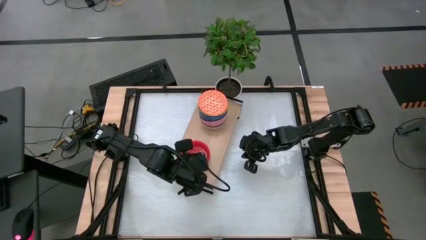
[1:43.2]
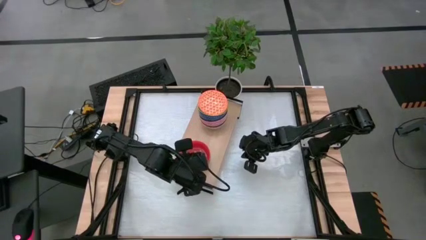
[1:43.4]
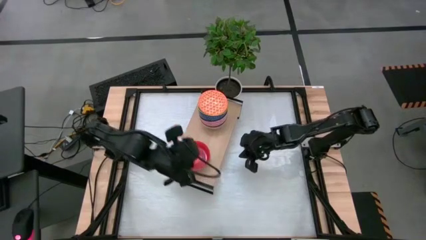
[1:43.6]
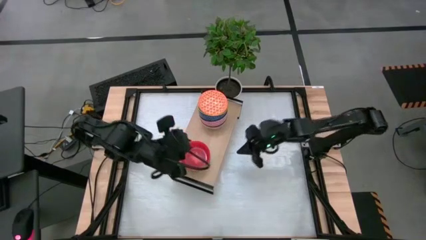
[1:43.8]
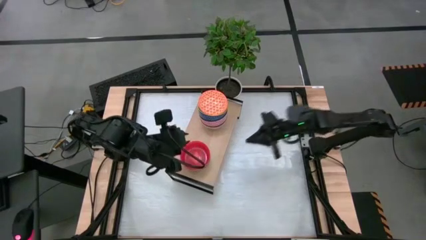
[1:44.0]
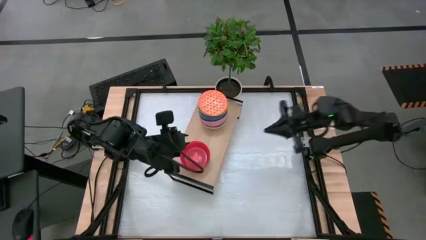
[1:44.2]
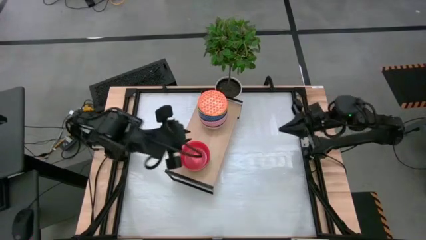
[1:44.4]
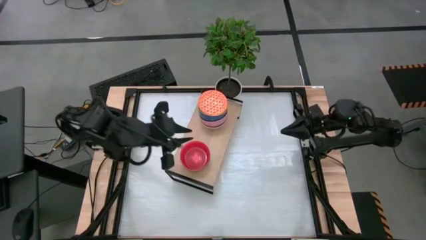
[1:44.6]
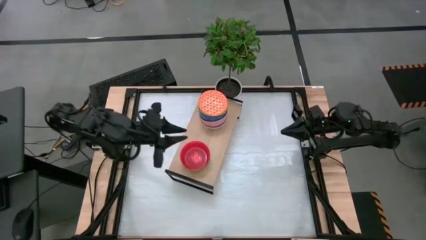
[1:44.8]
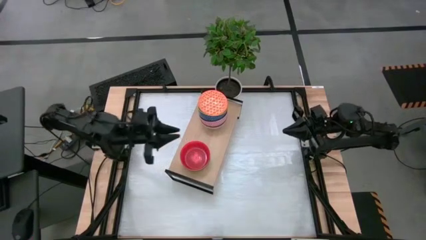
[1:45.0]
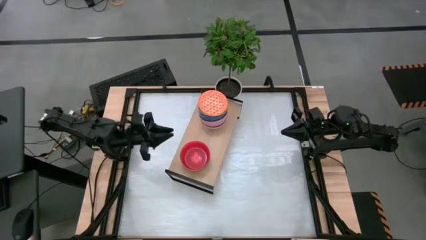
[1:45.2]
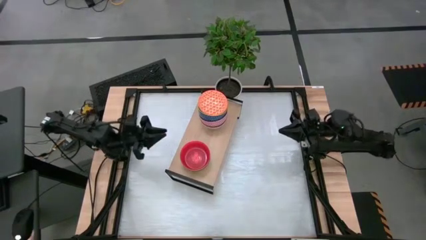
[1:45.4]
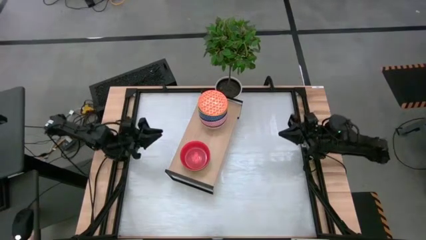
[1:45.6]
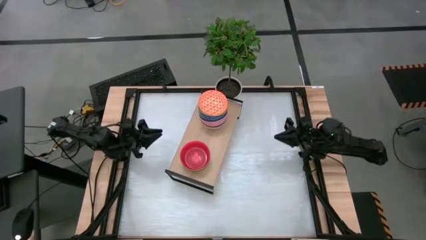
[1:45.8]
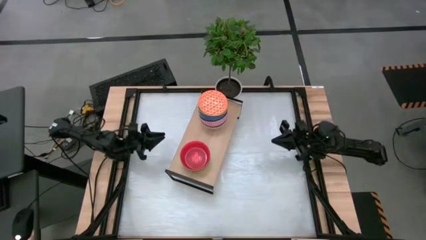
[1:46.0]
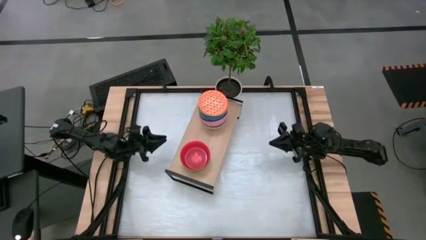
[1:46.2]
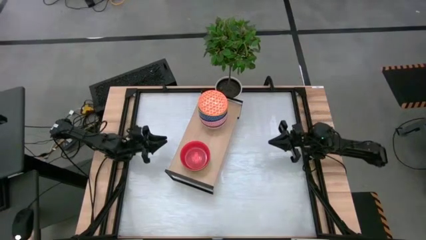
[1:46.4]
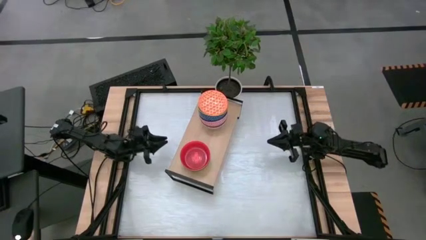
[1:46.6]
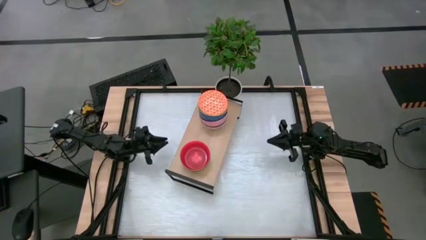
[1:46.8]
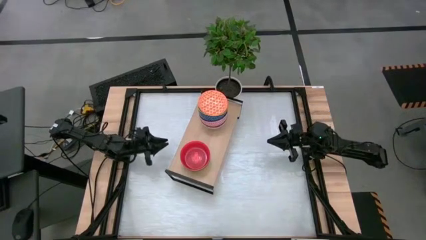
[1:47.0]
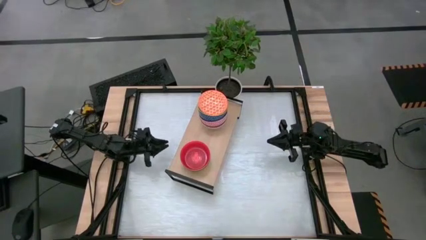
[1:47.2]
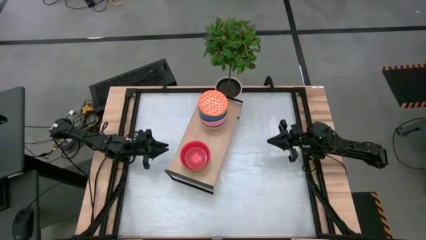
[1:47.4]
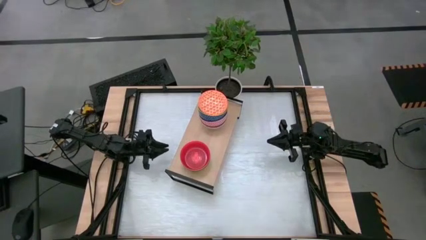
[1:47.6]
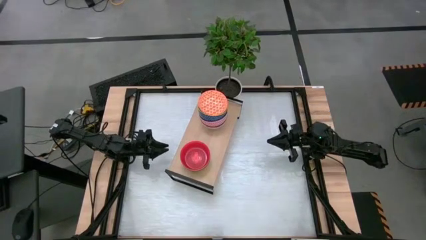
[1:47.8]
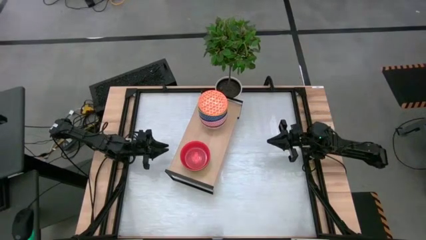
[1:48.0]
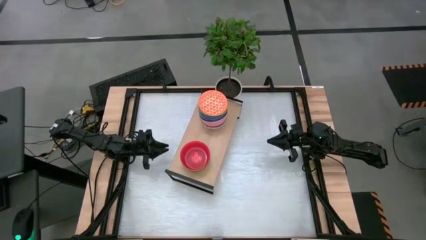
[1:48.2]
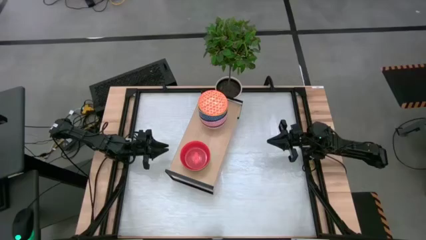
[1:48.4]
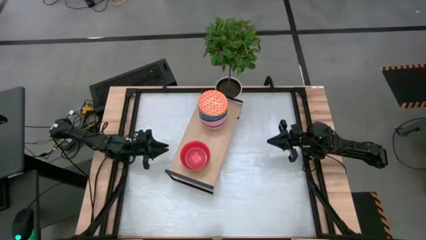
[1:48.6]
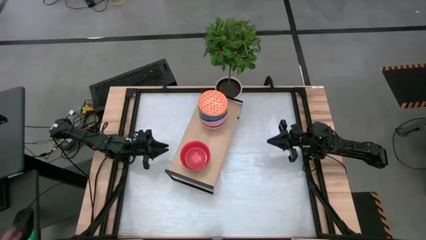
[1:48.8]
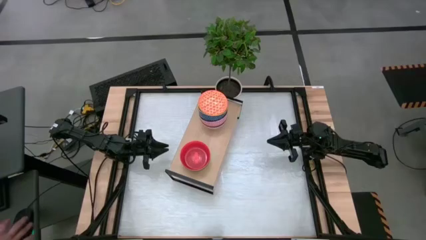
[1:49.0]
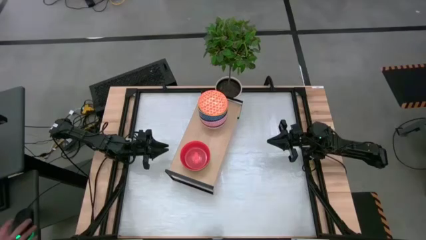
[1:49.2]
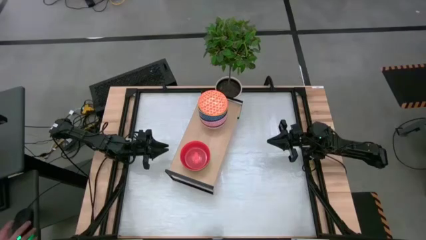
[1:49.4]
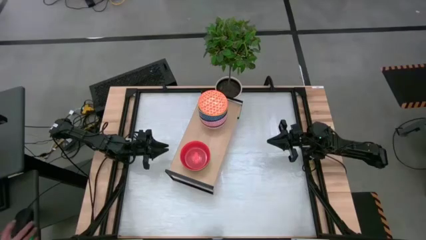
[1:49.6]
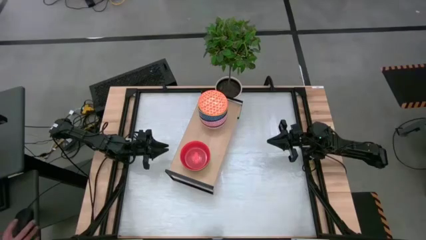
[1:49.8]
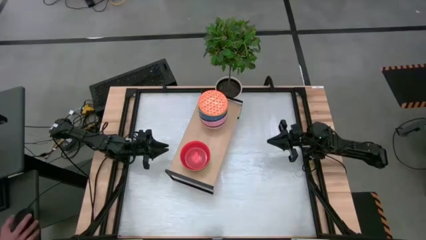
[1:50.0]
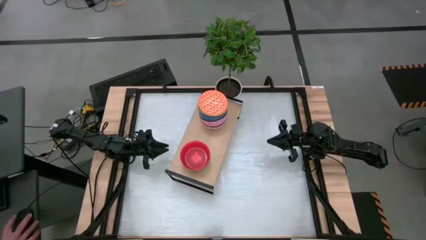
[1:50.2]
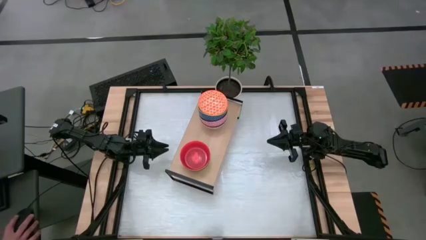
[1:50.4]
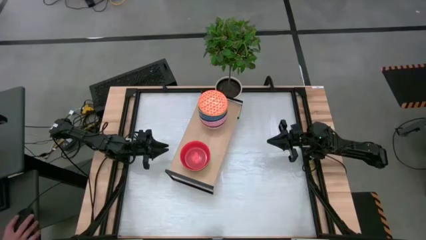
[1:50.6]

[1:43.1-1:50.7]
Task: Place and stack bowls onto a shelf
Return to Home Position

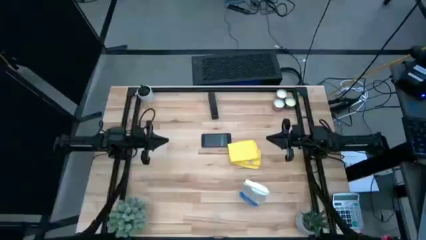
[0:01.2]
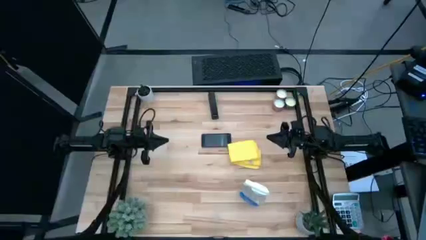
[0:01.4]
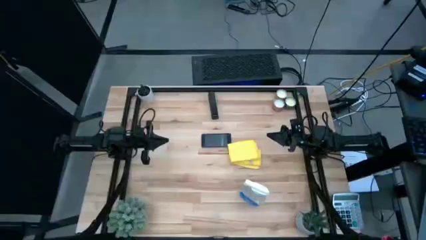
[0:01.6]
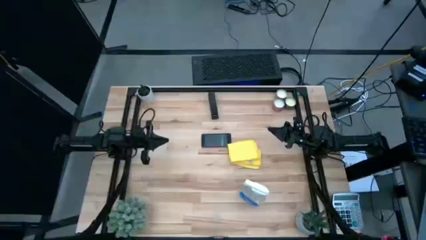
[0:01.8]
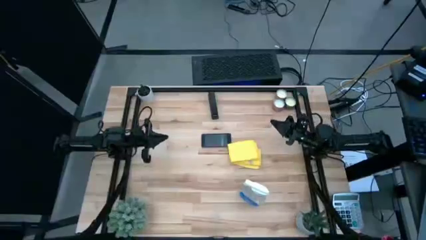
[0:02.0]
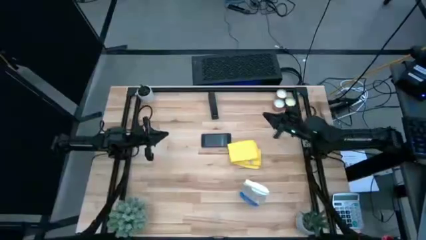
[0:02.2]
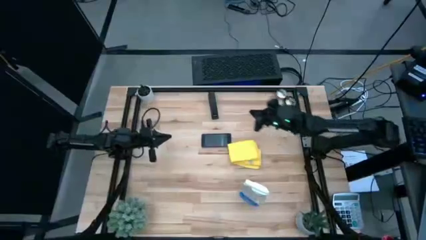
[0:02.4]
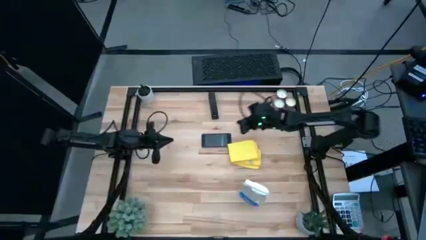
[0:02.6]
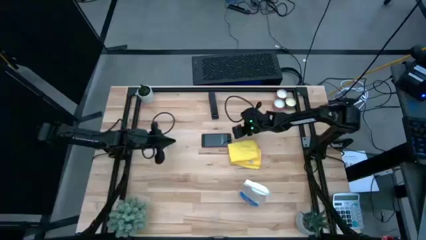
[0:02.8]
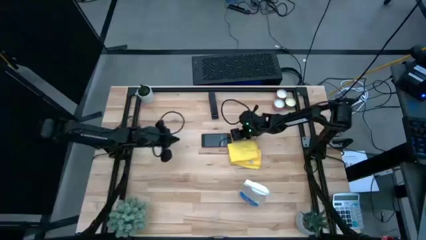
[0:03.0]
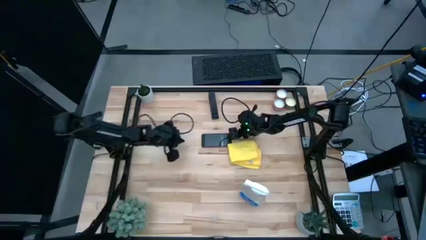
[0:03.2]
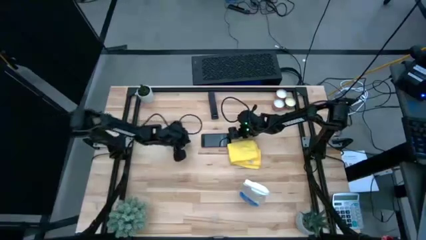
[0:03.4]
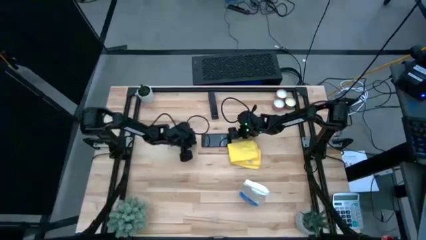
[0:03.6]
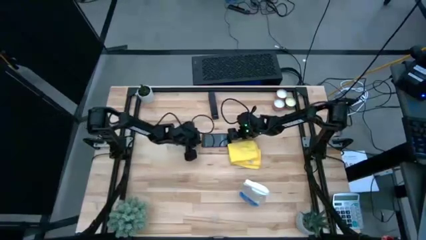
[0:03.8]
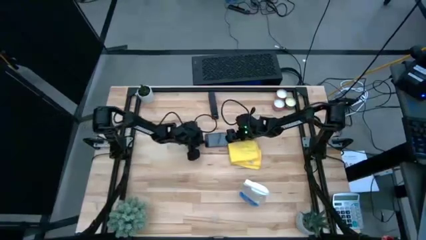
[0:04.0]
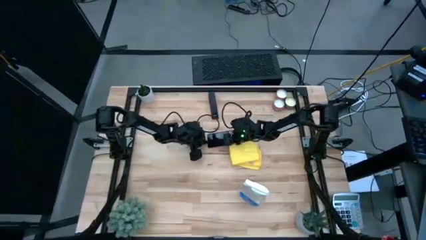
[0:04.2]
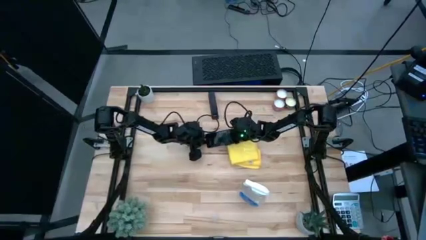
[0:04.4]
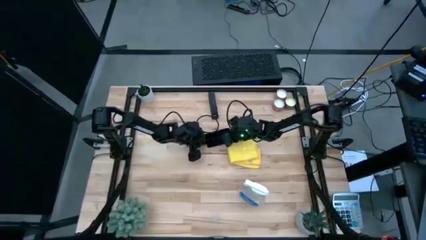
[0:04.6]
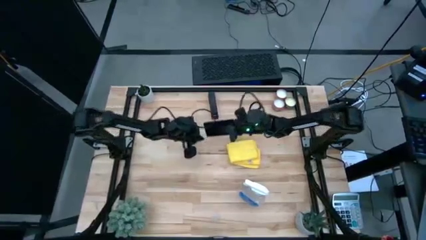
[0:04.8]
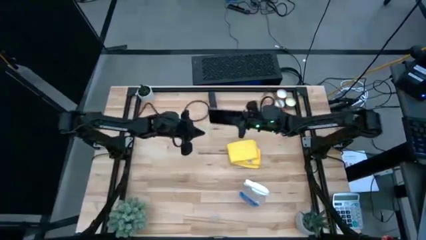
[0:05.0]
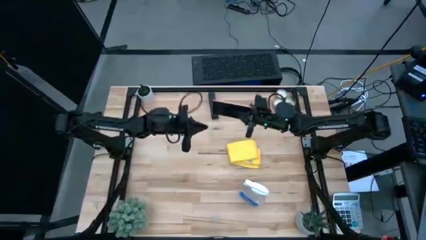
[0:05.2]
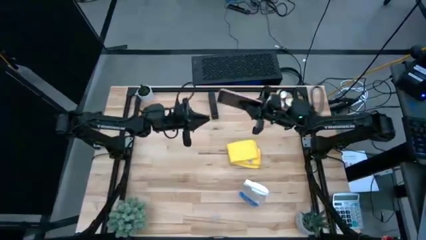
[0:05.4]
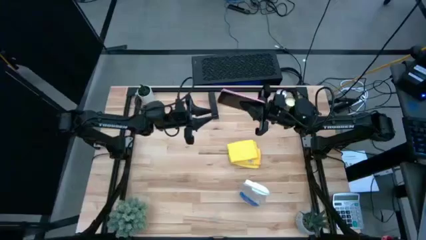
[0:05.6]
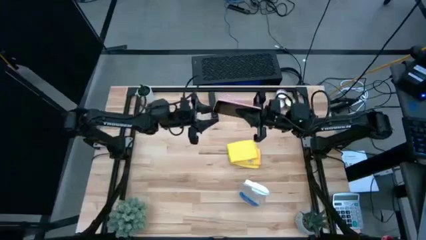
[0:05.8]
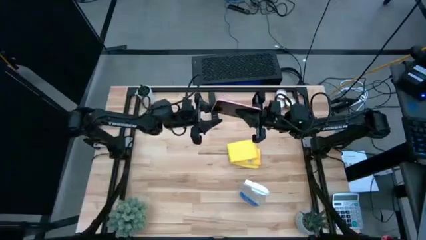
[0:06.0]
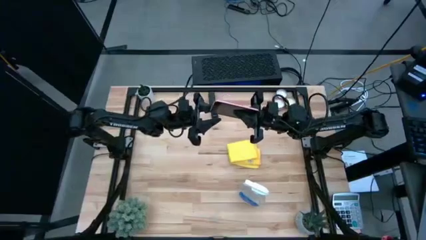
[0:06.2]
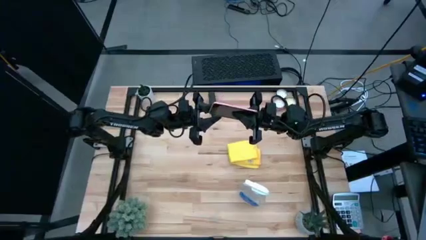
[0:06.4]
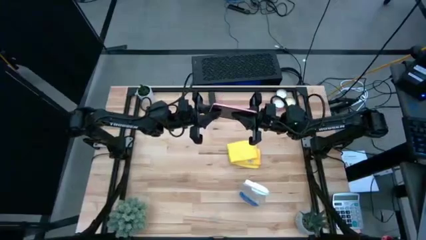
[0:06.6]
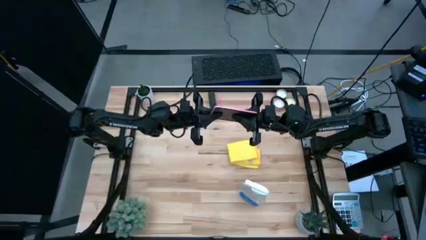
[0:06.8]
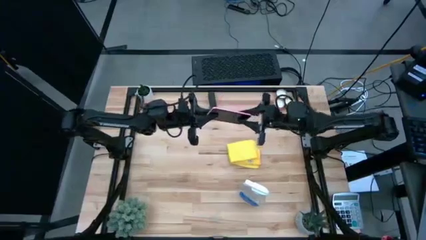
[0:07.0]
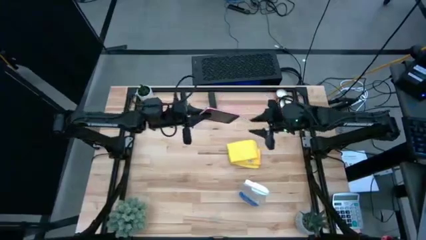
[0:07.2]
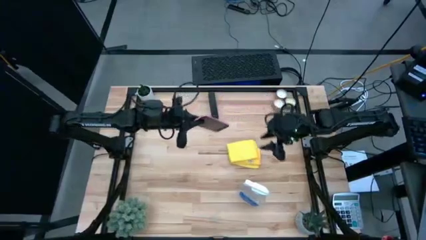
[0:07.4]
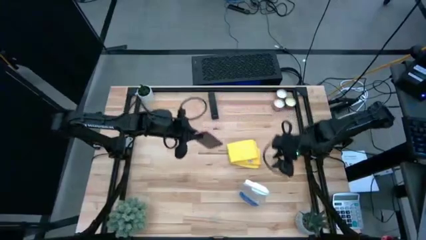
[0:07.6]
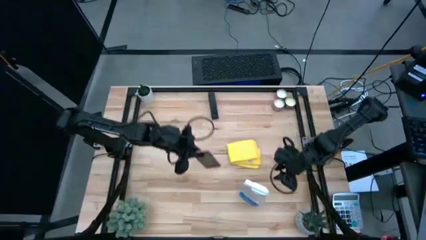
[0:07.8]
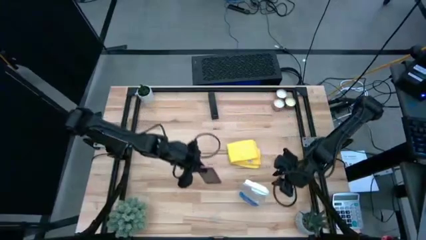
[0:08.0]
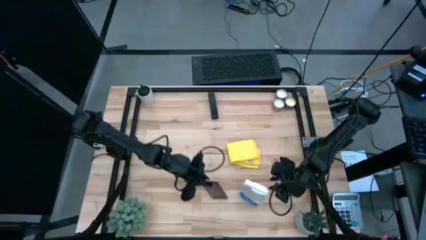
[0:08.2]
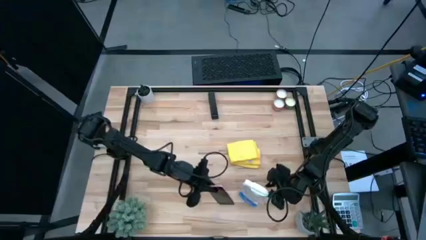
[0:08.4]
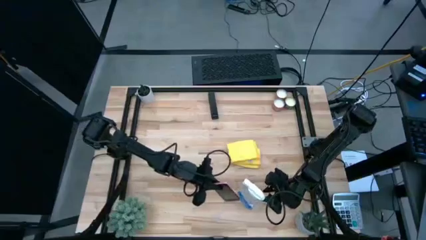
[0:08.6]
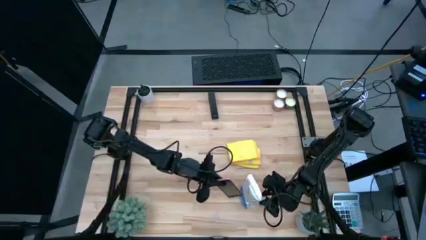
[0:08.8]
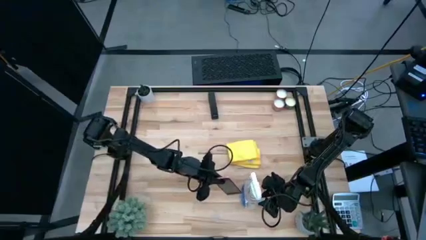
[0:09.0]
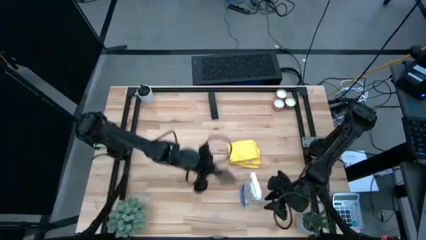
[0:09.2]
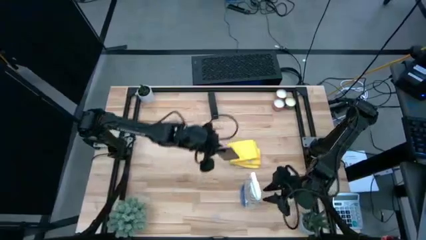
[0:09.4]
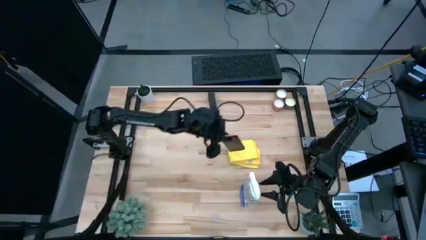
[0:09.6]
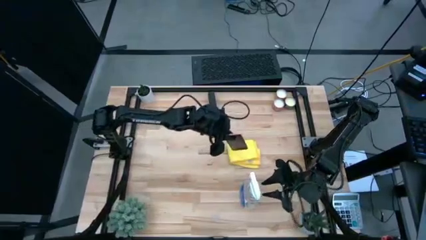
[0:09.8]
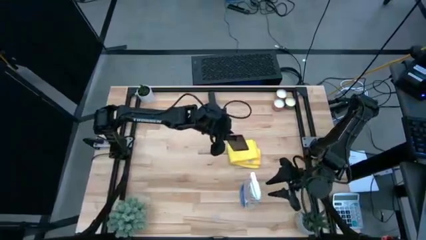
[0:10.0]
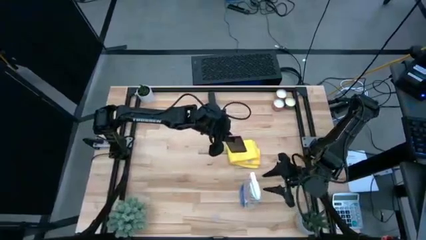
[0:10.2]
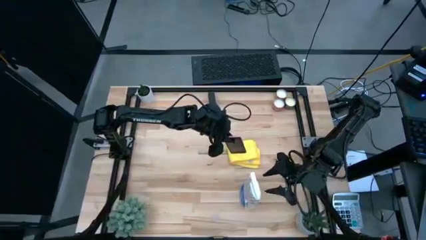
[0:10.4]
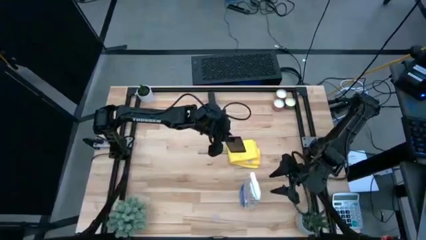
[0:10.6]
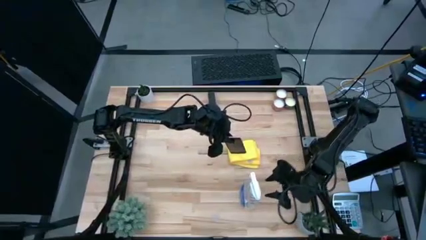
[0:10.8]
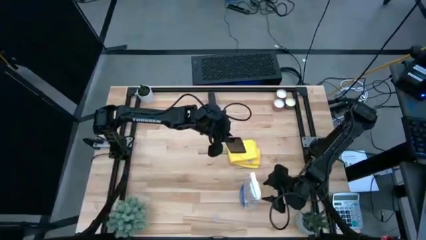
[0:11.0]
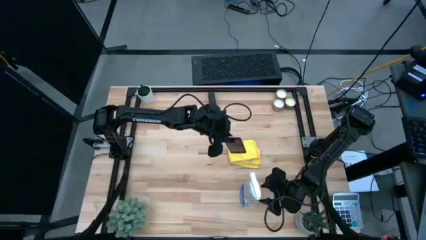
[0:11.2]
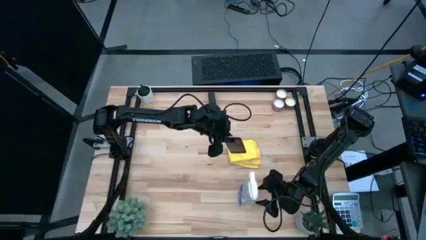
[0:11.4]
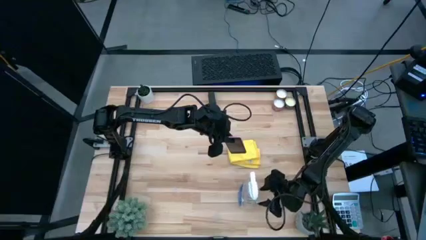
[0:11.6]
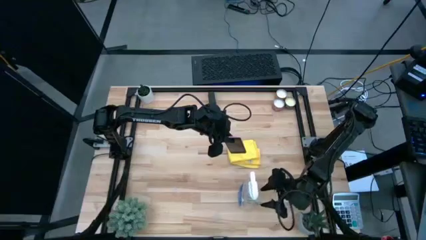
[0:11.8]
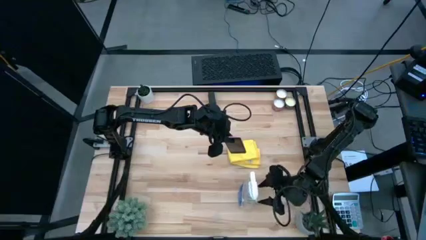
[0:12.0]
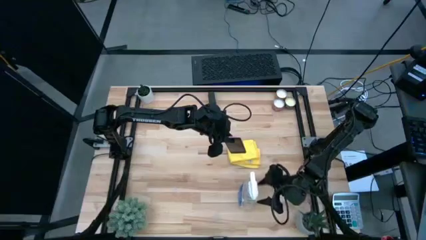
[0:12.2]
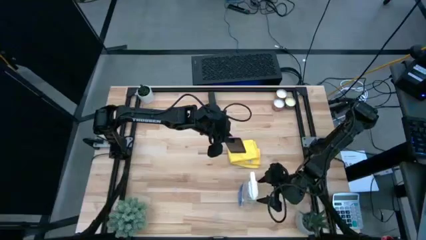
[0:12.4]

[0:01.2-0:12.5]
Task: Apply microfiber cloth
Spray the cellphone using a spray bottle
